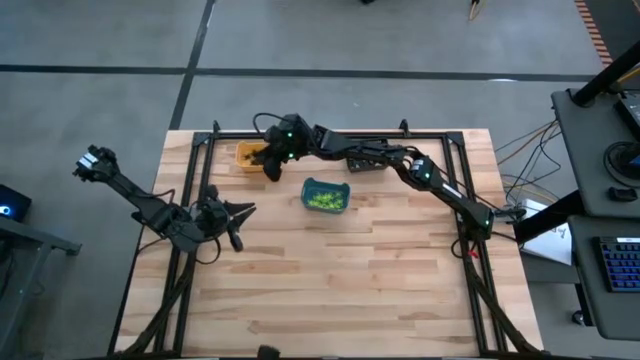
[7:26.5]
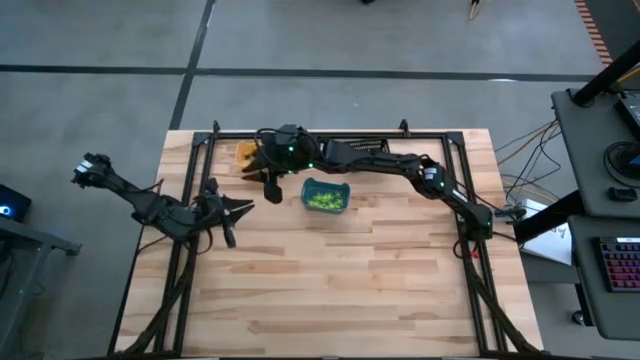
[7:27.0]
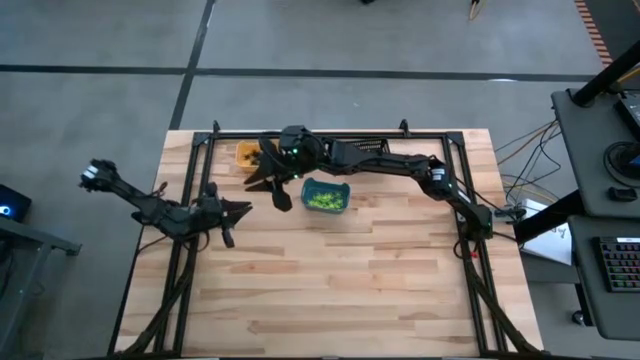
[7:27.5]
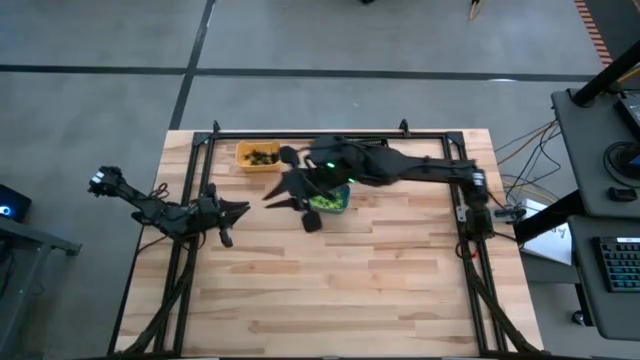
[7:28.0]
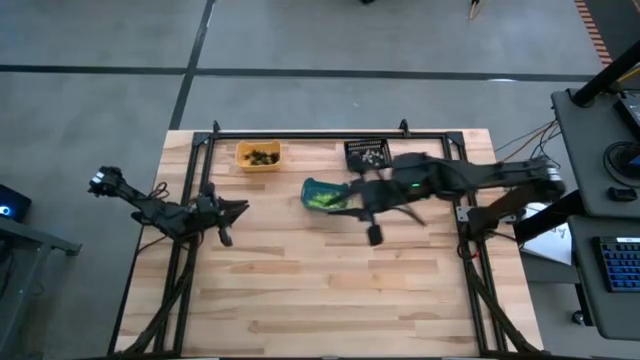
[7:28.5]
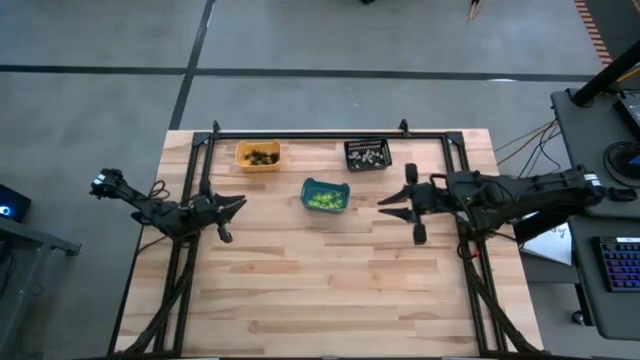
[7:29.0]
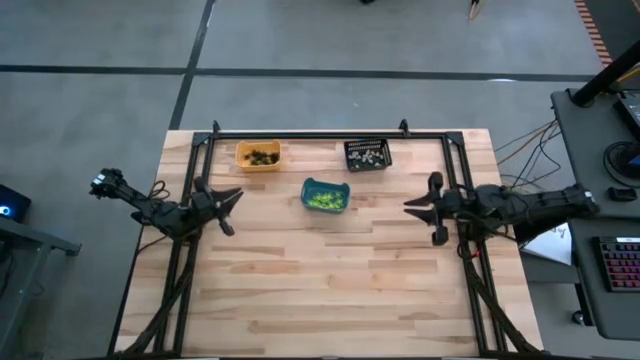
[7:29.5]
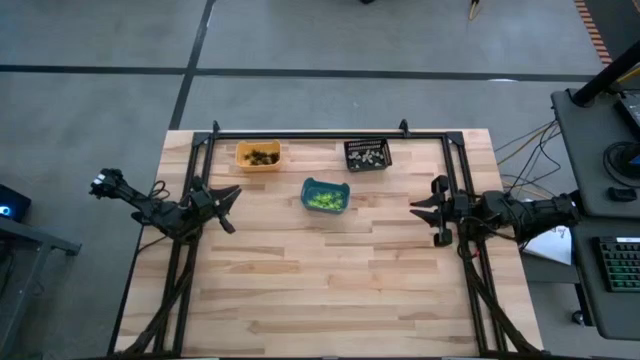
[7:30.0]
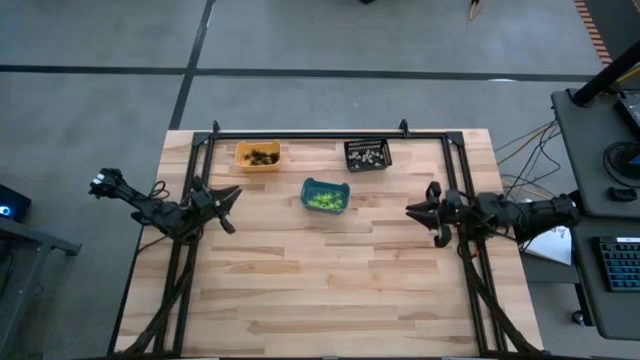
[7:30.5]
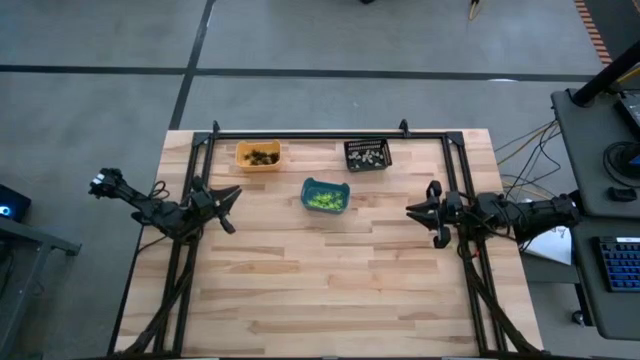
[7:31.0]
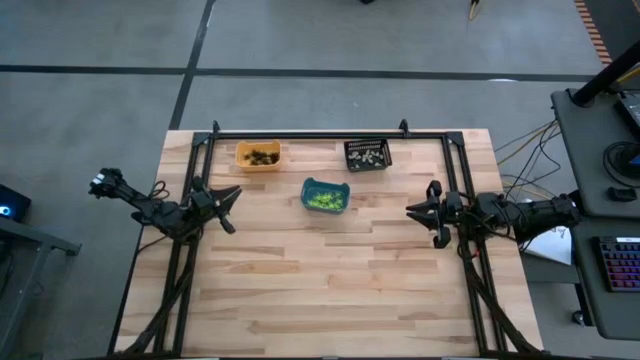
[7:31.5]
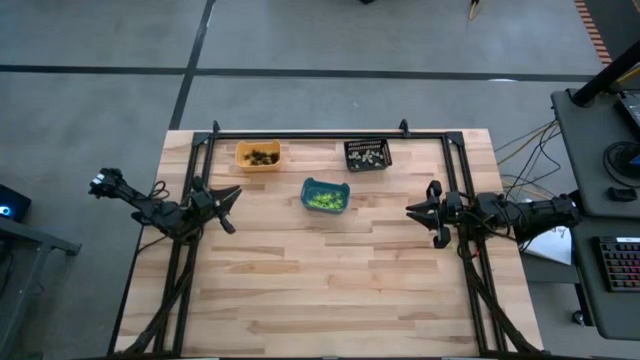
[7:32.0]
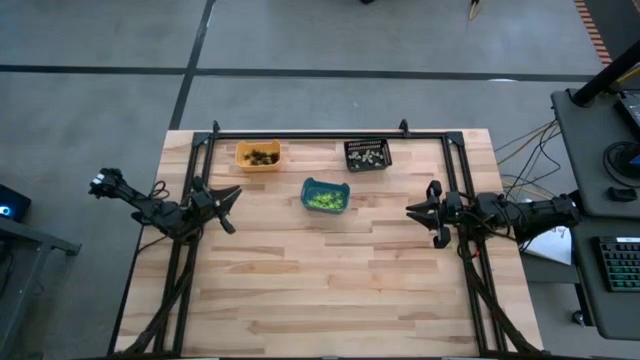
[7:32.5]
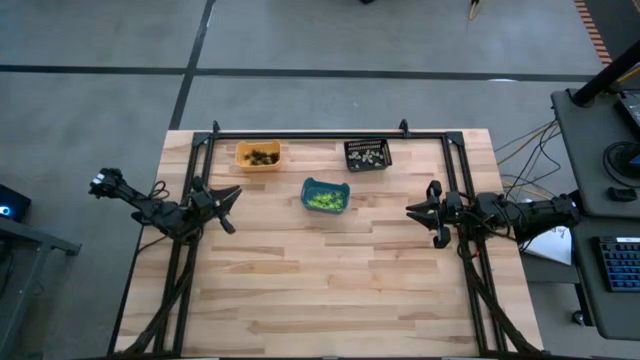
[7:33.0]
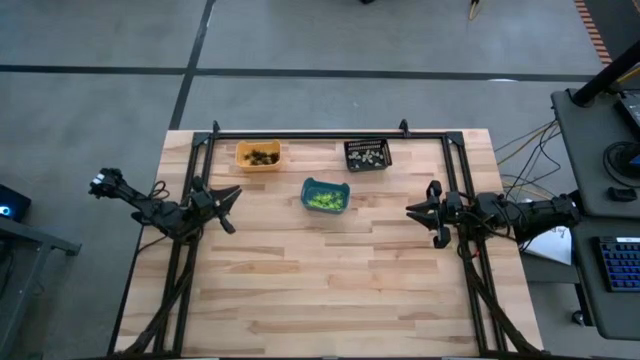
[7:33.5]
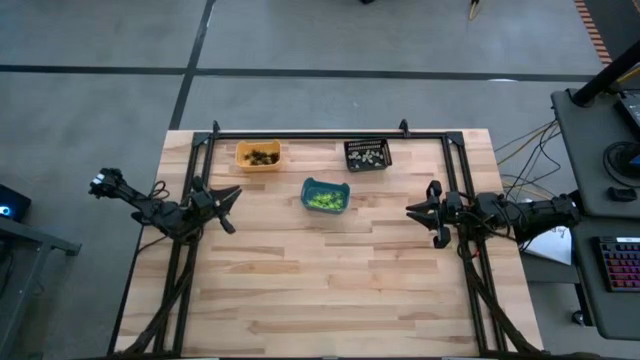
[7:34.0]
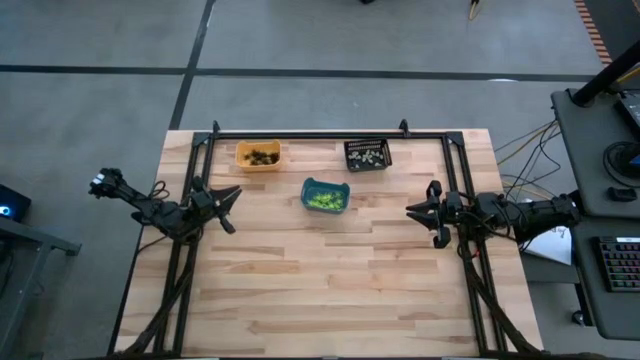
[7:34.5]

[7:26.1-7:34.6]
Task: Sort Halloween decoration
Return to Home Position

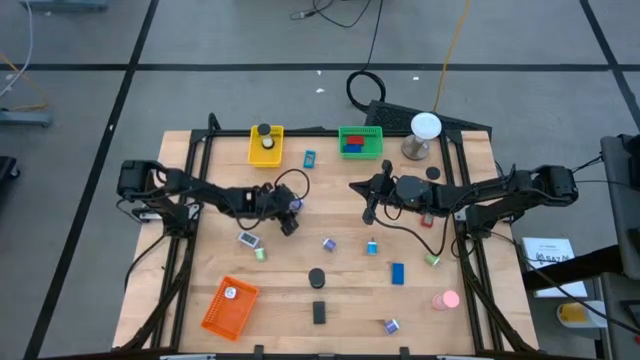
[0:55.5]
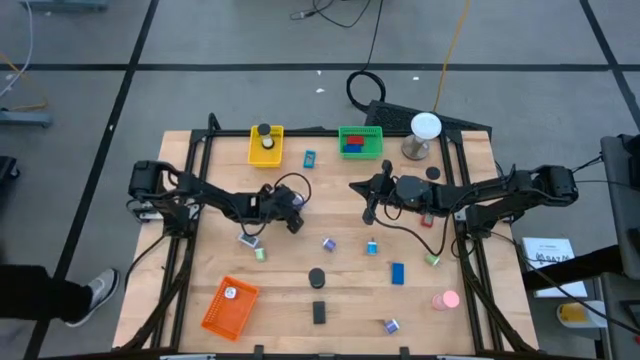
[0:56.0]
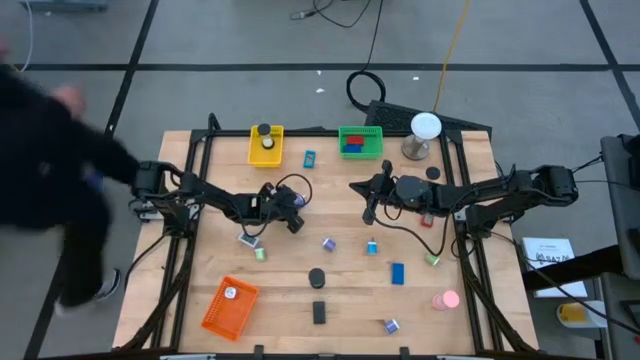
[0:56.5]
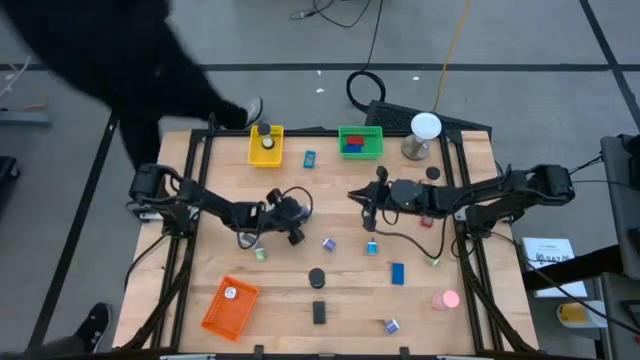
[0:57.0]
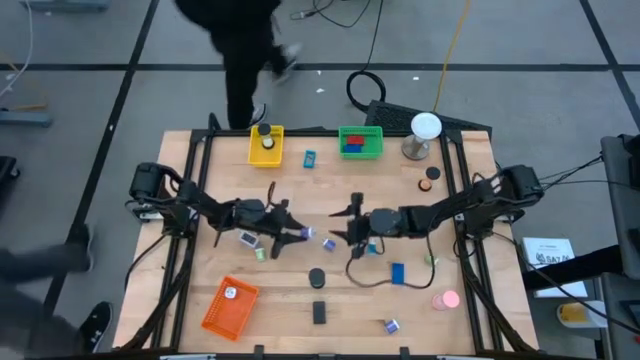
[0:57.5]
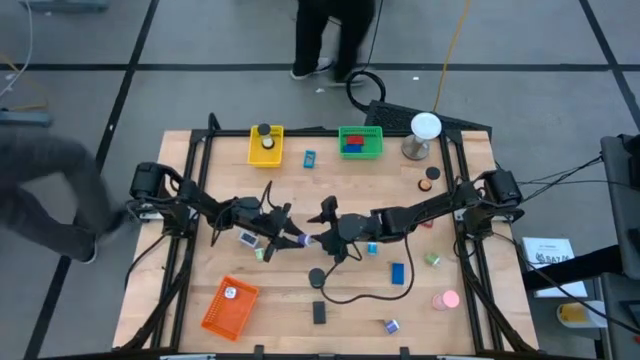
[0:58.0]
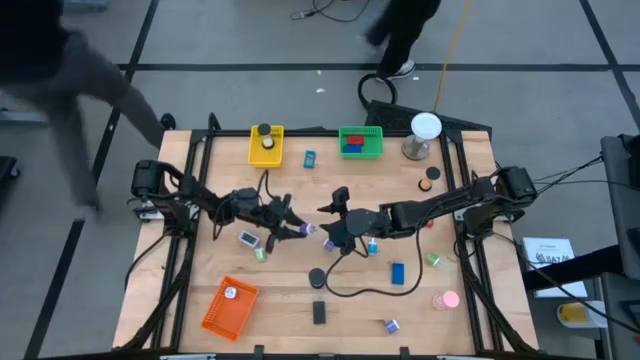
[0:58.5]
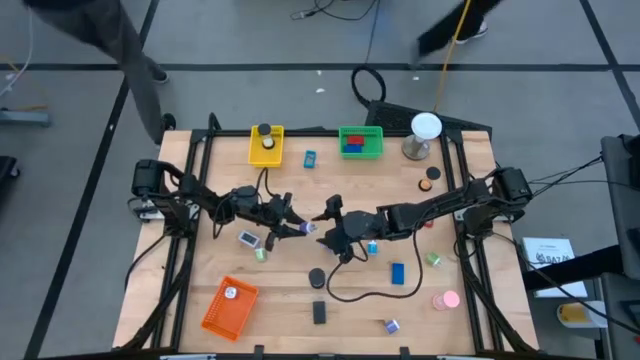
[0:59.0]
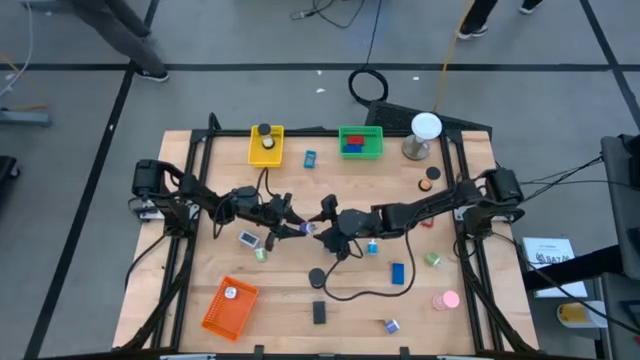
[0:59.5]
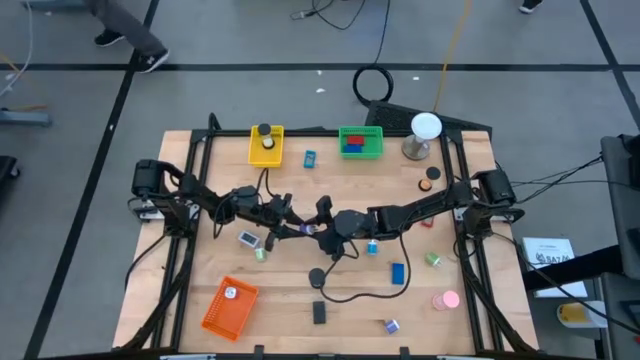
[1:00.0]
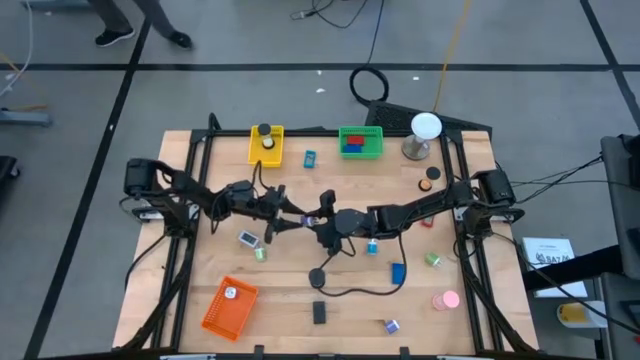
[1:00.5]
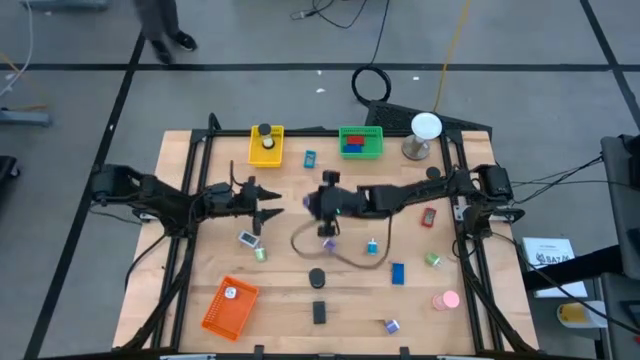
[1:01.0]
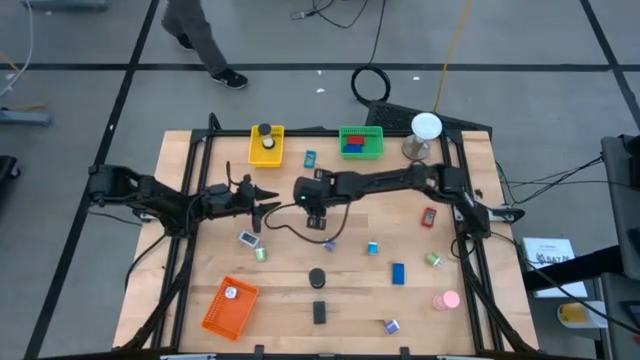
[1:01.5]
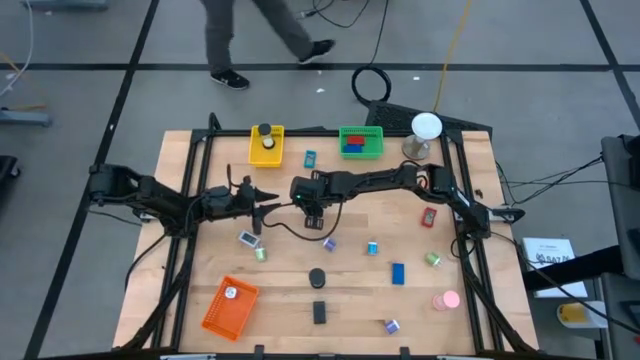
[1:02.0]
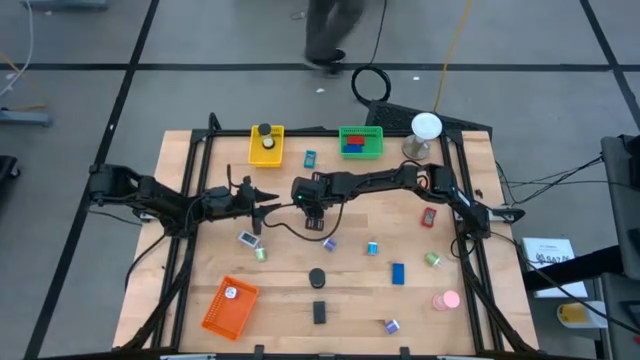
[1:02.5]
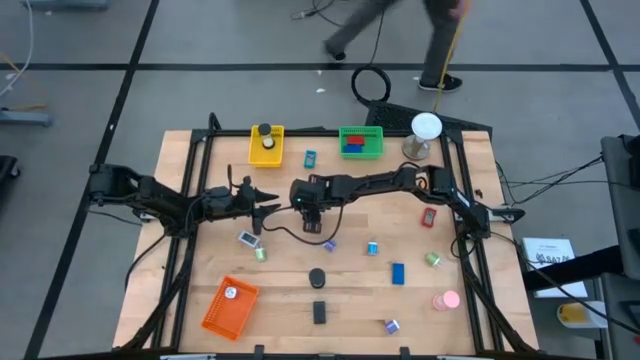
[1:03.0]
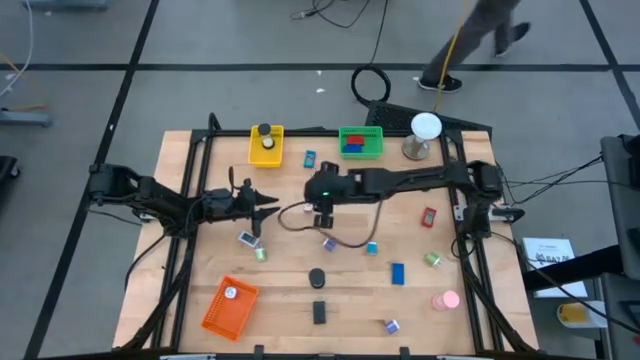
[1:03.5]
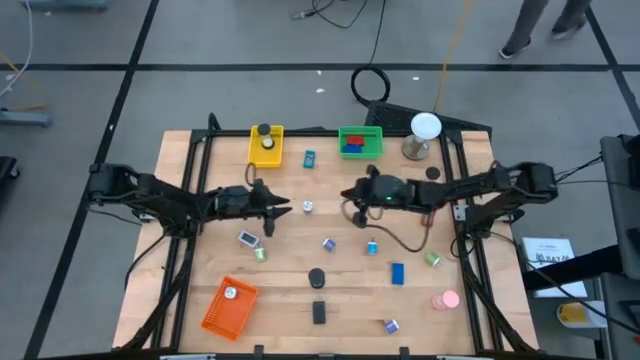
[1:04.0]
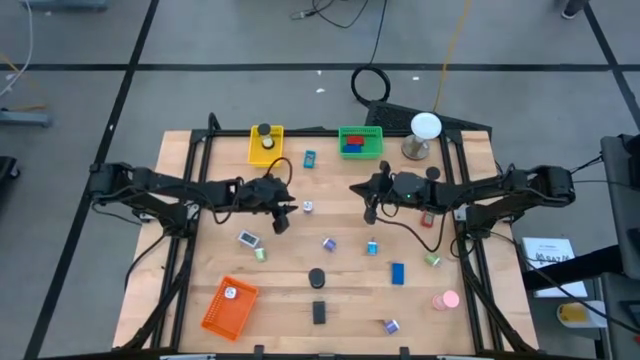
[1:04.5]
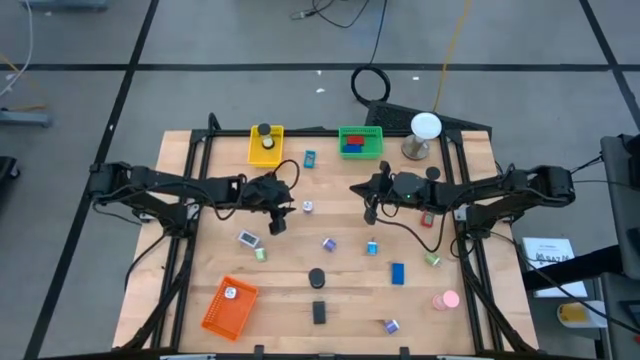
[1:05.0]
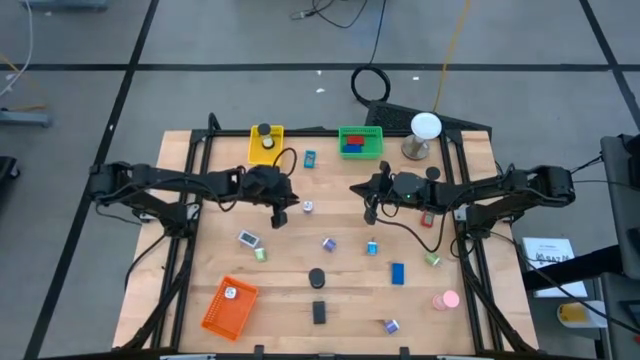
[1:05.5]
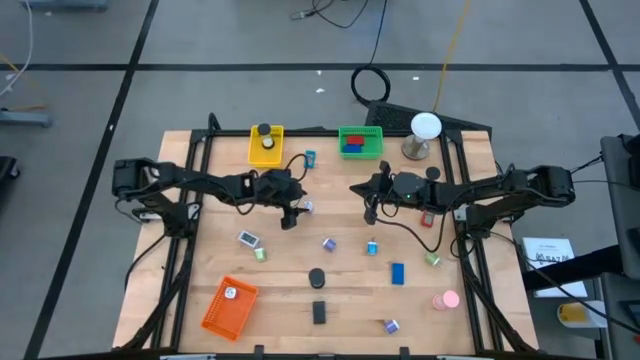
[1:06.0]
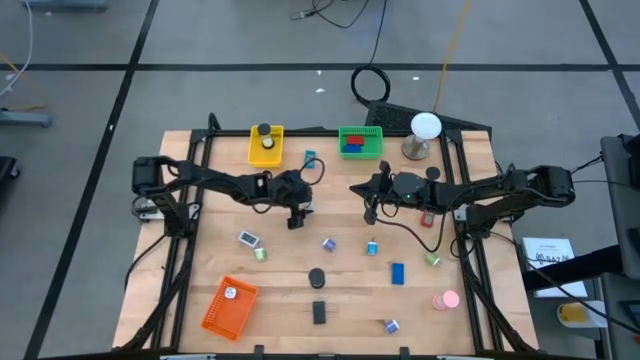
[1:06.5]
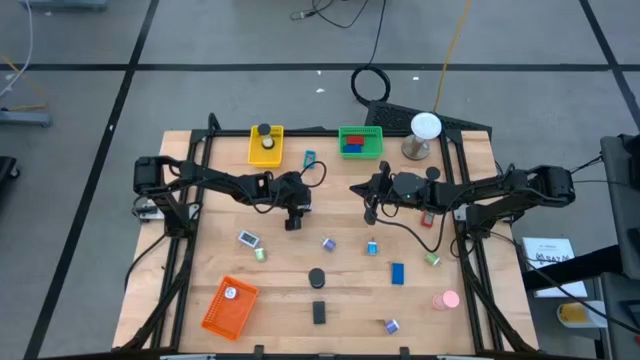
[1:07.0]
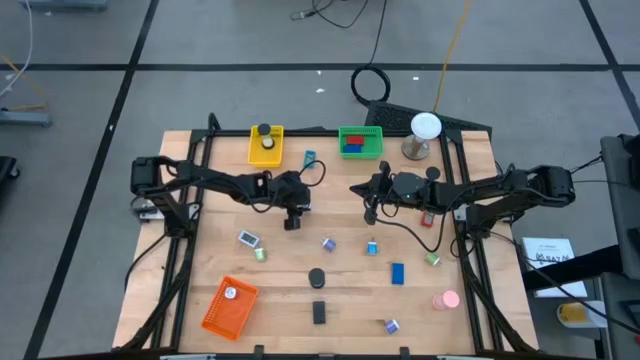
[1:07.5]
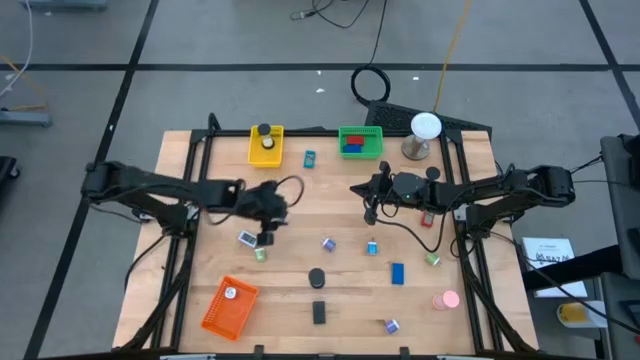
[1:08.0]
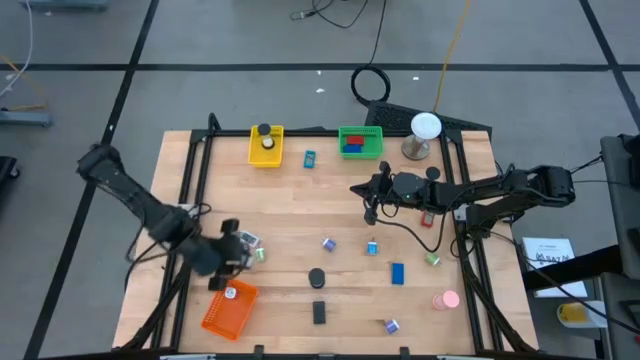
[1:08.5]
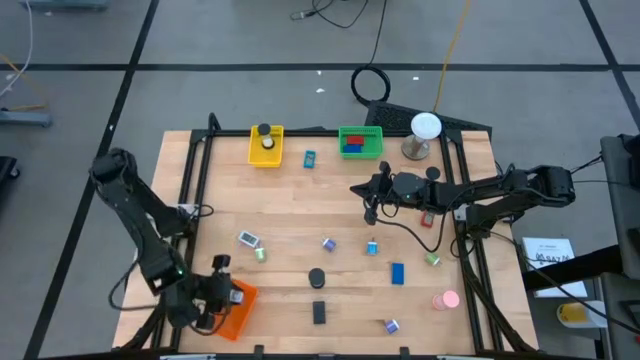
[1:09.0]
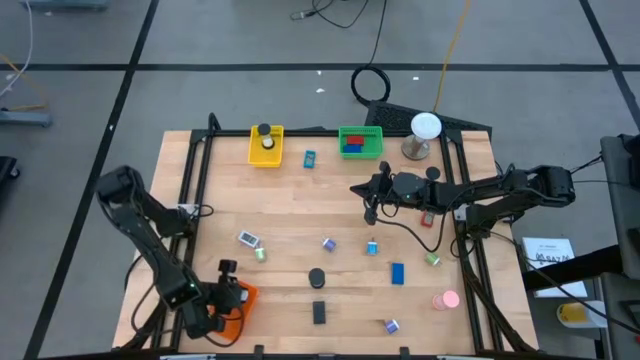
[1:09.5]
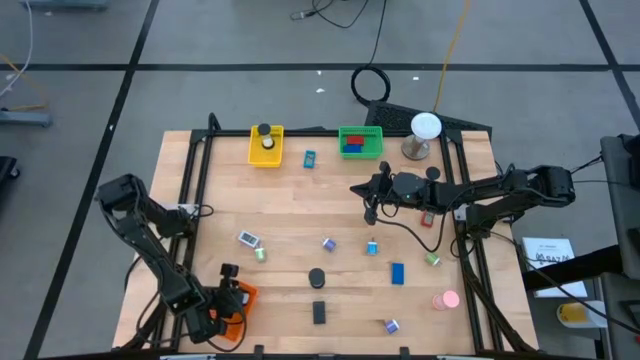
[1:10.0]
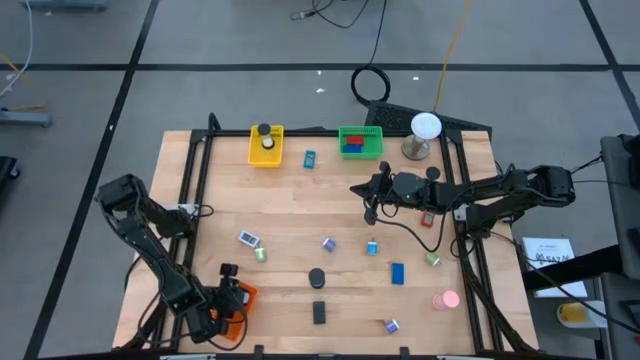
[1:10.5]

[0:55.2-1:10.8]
Task: Pick & Place Office items
Put the top purple charger adapter into the orange bin
